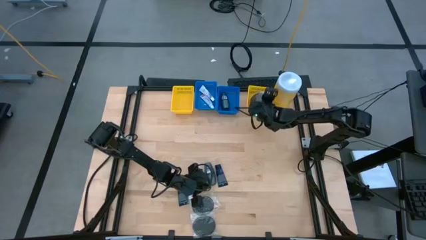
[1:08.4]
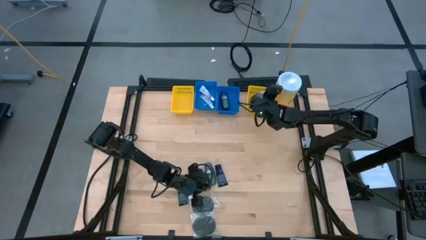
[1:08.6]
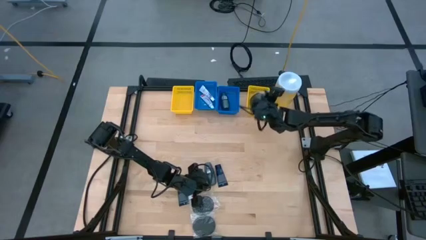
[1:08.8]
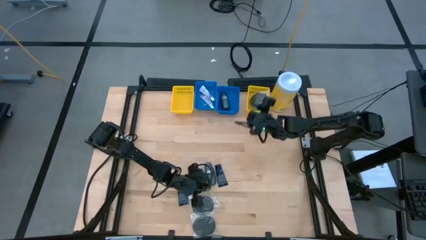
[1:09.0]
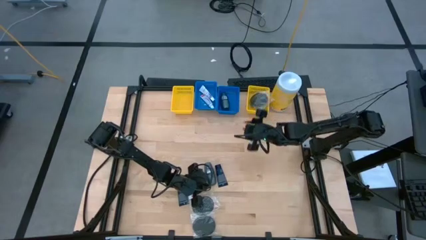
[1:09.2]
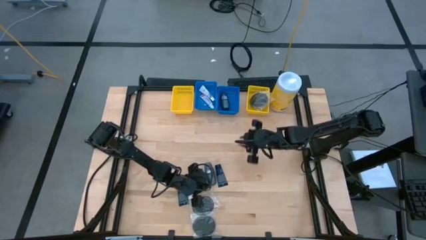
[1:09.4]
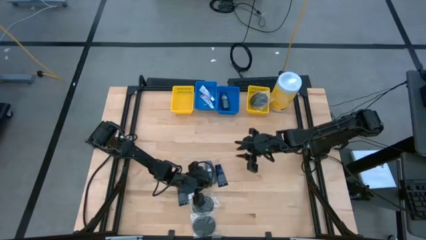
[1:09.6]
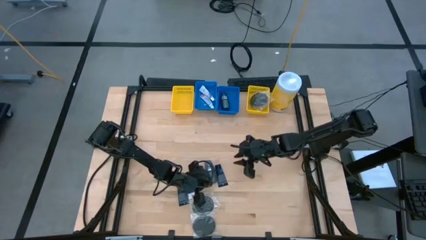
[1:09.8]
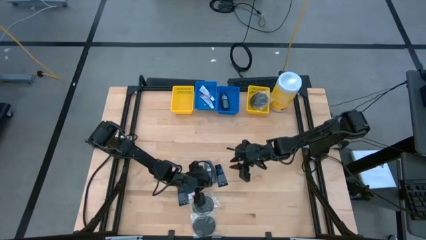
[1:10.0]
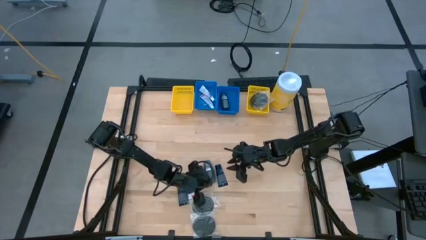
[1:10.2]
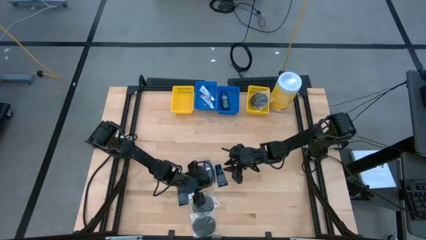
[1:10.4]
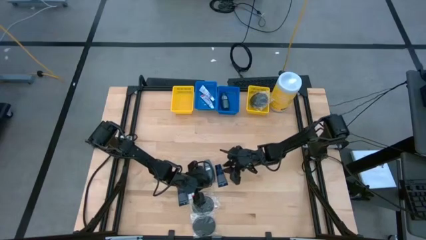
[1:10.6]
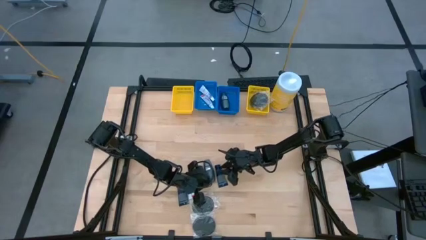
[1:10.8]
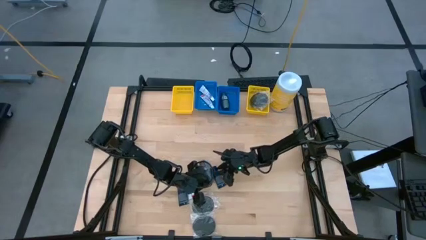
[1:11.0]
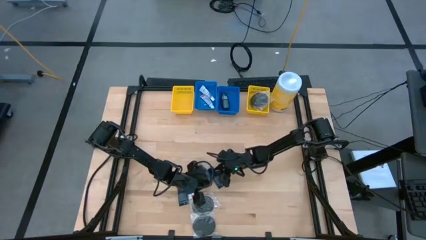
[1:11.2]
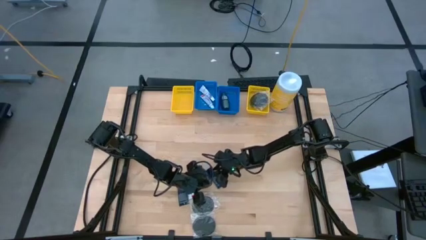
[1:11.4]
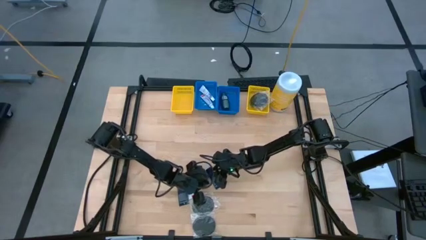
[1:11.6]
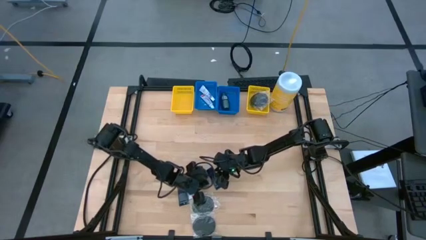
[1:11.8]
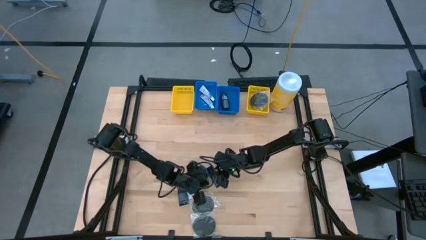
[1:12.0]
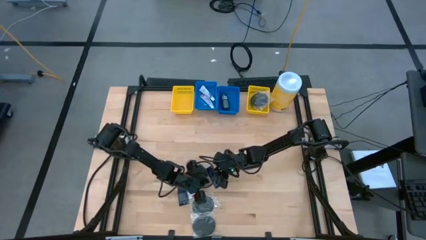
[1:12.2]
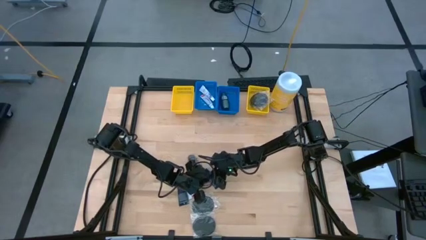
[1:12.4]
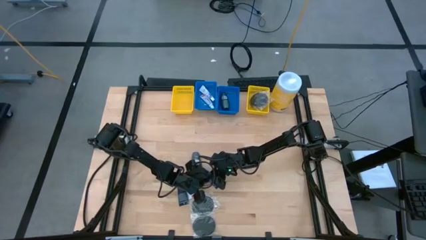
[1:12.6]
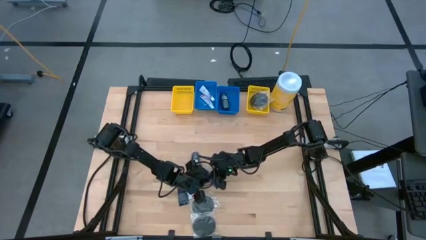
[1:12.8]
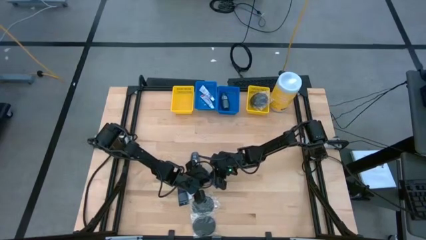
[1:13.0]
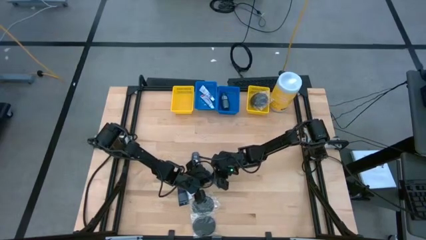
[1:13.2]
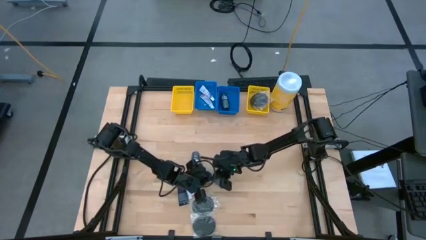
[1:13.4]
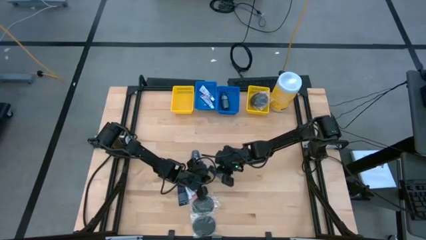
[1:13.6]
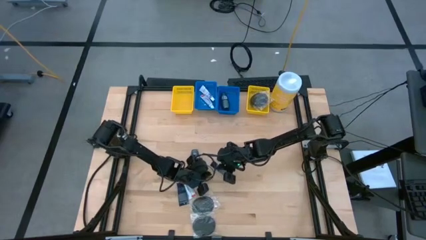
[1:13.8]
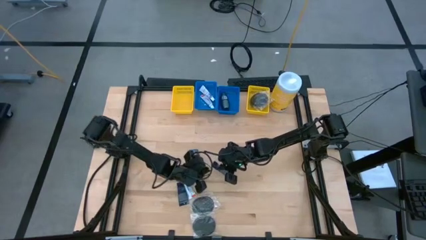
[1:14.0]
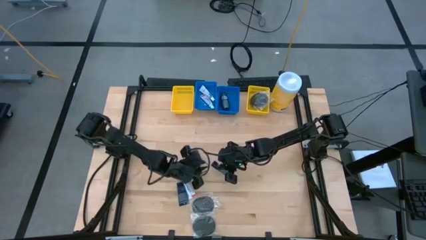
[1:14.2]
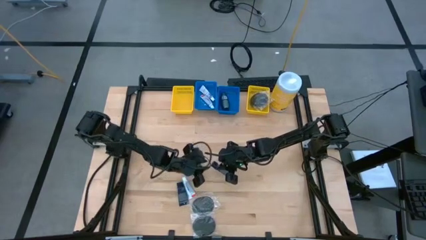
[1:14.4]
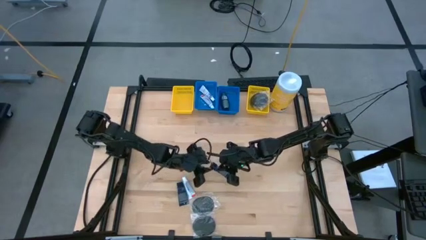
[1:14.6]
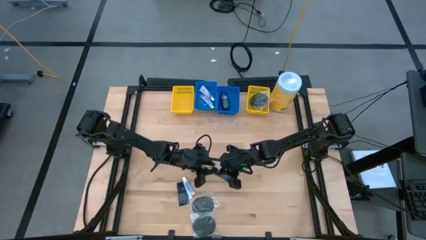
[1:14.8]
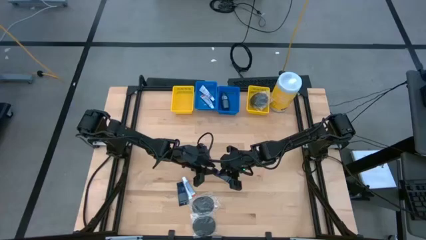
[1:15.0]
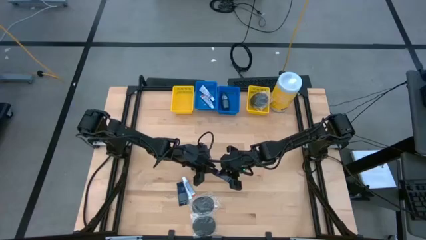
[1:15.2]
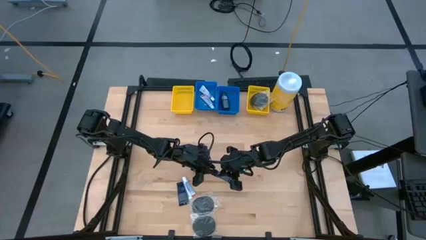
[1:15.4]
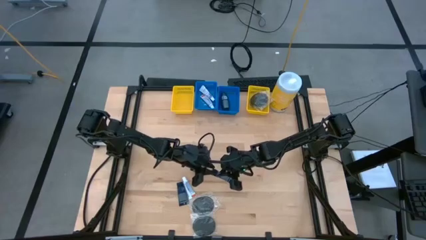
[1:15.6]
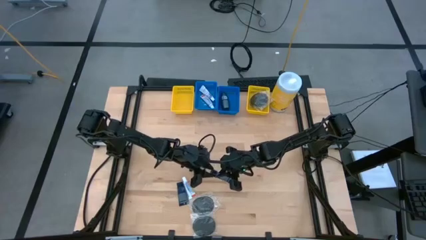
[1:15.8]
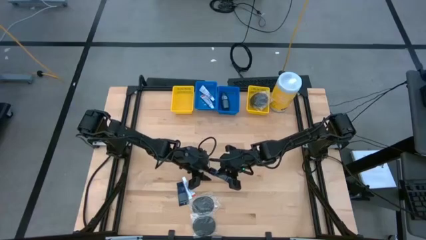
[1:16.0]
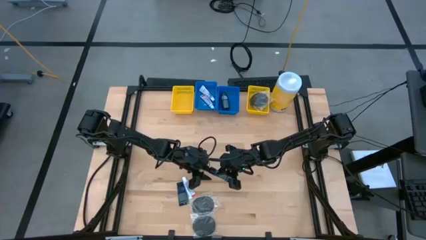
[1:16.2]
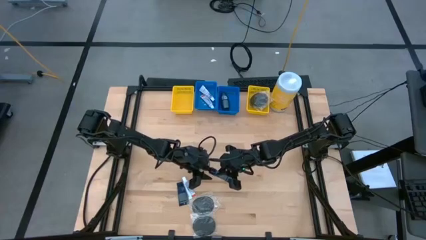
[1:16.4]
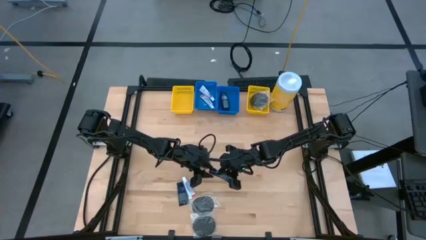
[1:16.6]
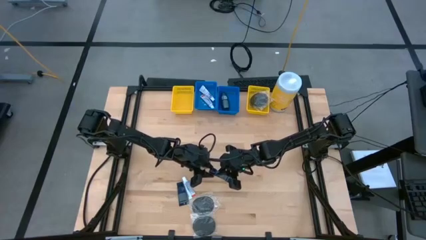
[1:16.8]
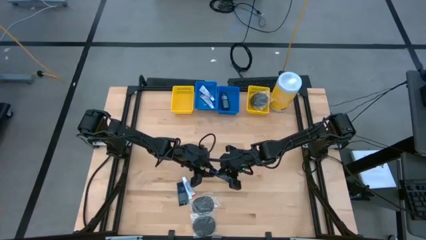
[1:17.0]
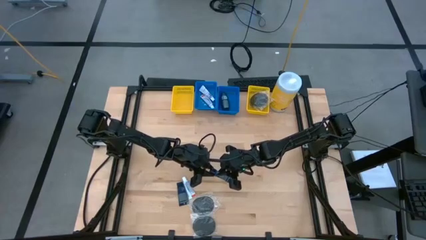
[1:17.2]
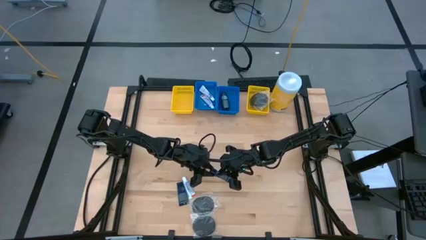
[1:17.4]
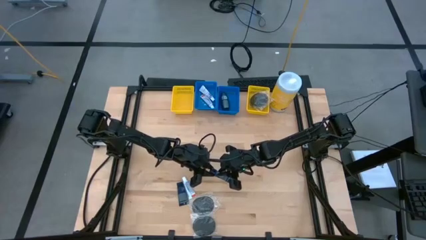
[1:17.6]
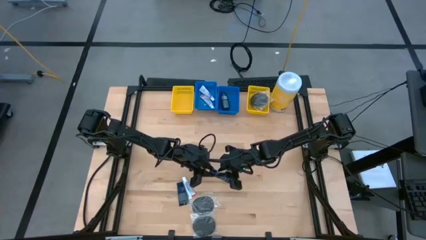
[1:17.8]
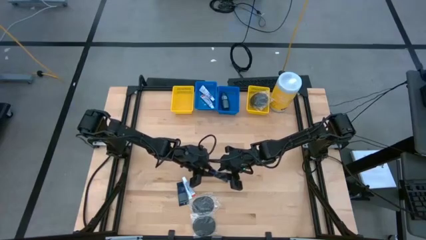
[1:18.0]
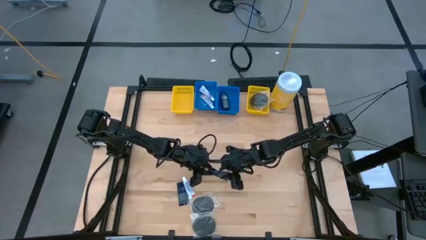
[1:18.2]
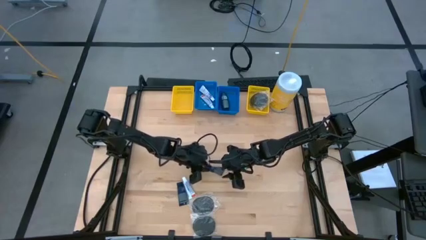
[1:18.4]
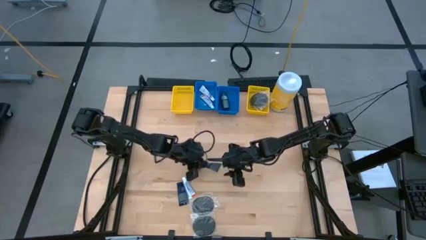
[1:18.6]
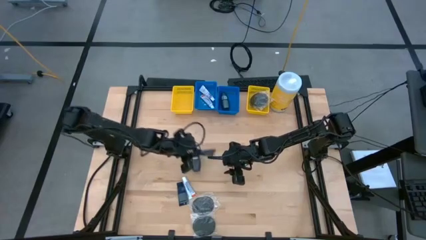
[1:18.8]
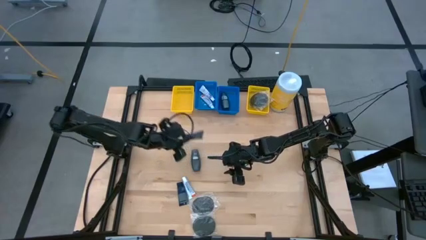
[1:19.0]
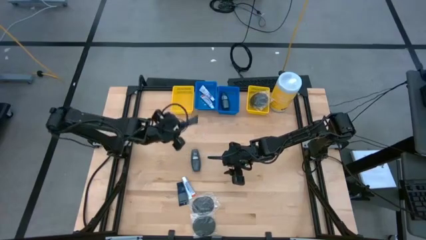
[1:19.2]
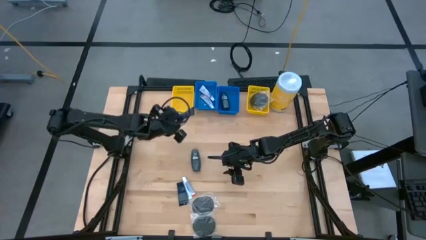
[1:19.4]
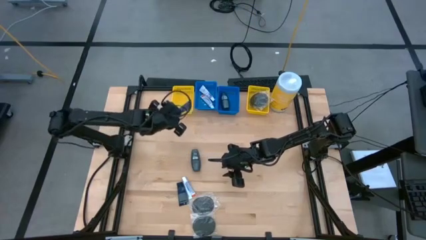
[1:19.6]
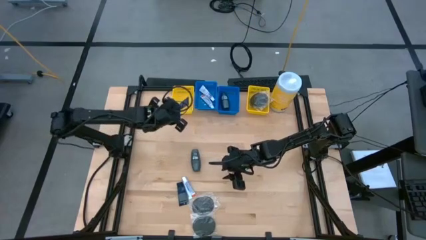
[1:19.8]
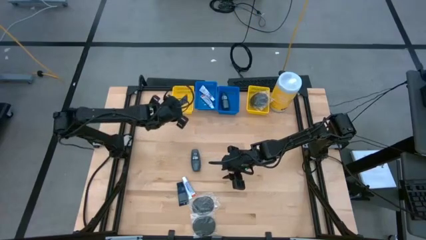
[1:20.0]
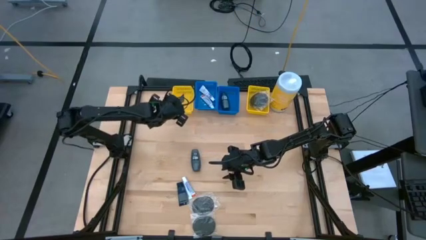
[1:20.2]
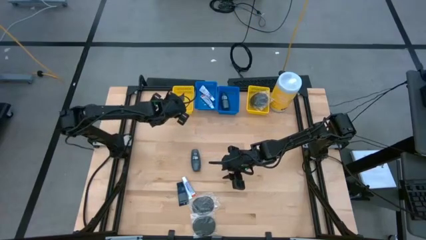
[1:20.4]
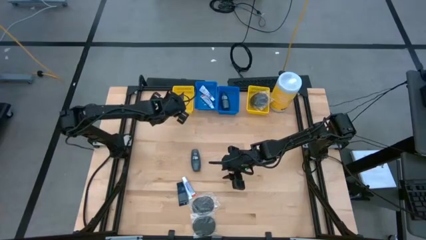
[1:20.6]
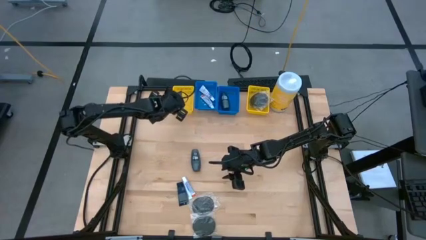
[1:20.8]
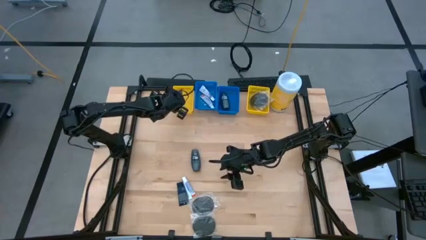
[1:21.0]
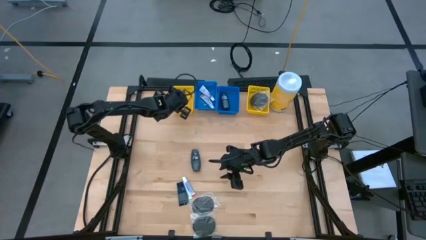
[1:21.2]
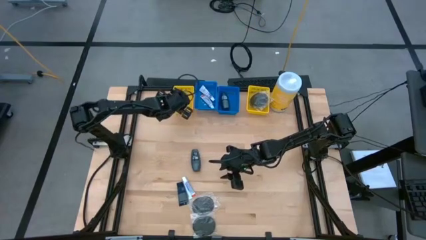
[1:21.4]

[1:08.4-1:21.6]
Task: Pick & Place Travel size toiletries
Put the blue shave cream into the left yellow bin

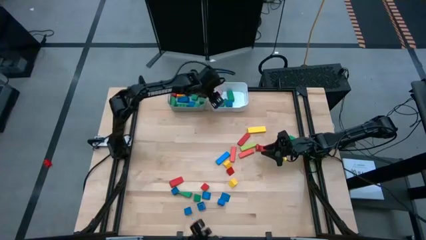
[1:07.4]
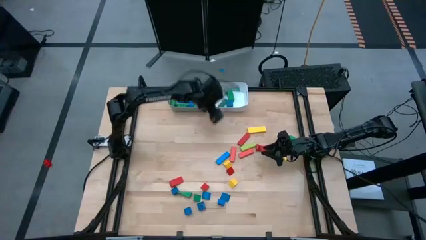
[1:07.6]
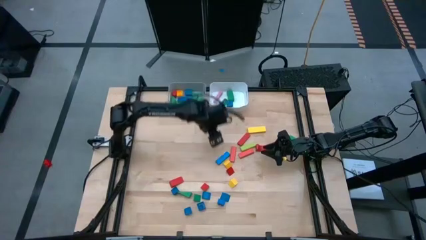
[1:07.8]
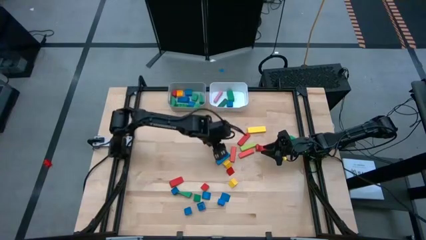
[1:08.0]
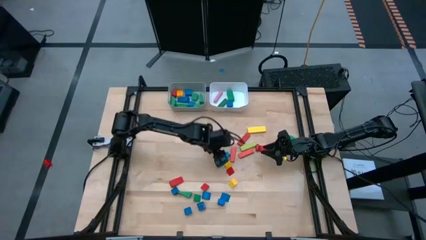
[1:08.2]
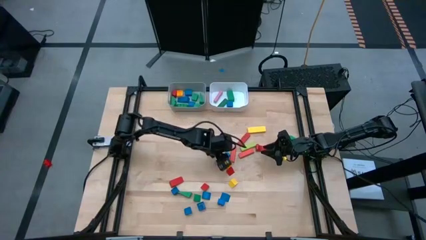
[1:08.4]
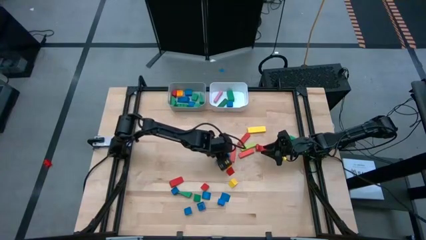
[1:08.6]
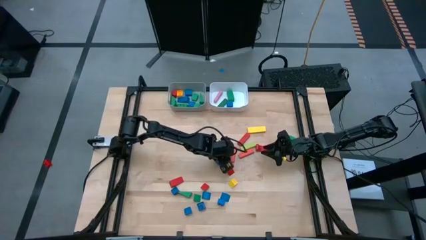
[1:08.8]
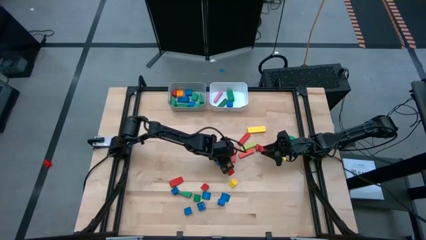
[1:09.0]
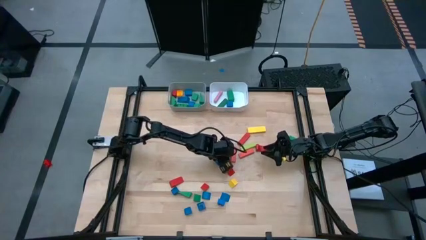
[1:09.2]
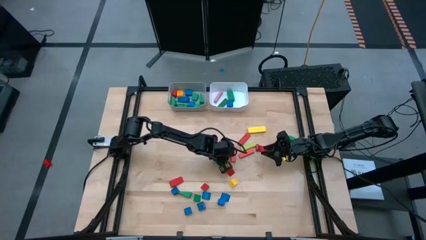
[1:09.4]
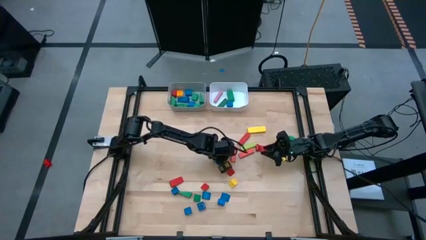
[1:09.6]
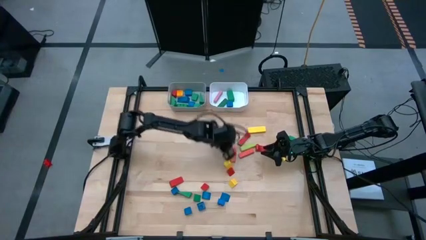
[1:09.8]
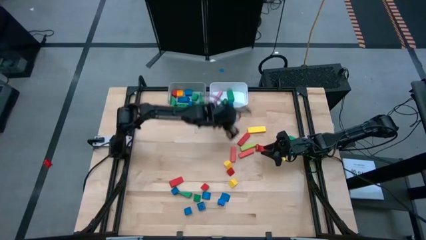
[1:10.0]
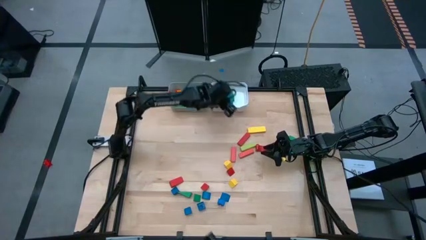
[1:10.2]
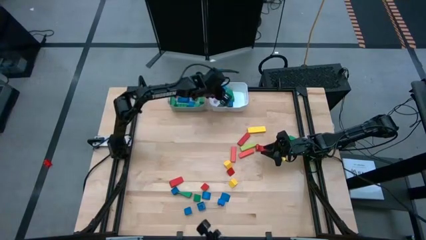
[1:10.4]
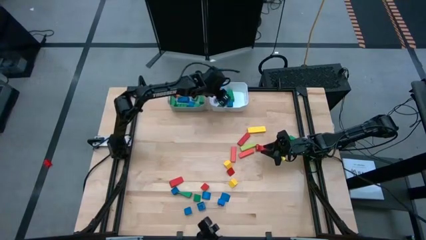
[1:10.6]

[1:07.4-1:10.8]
Task: Sort blocks by size
Put the blue rectangular block into the white bin
